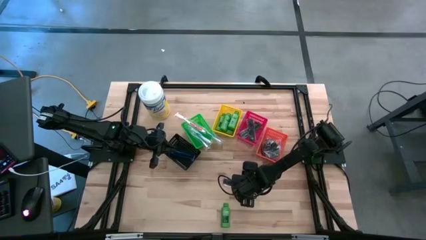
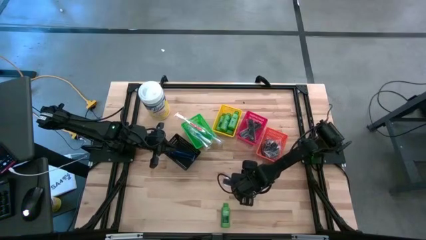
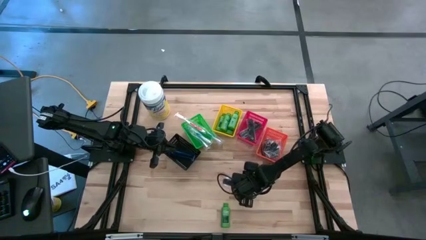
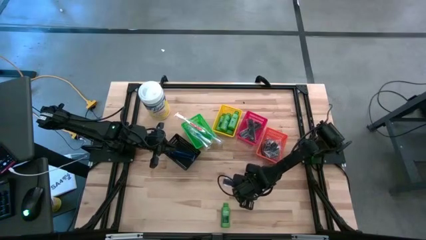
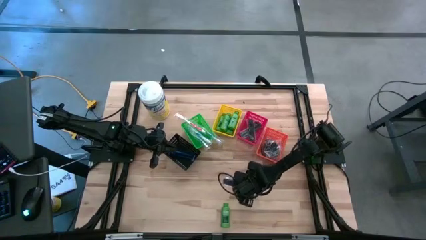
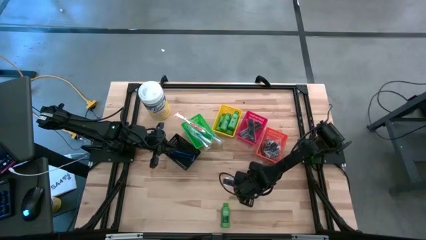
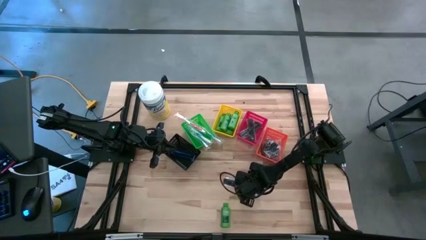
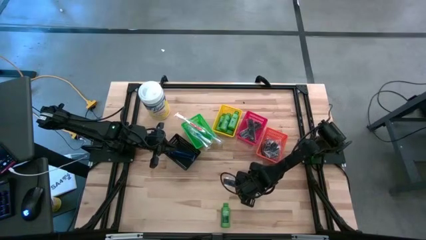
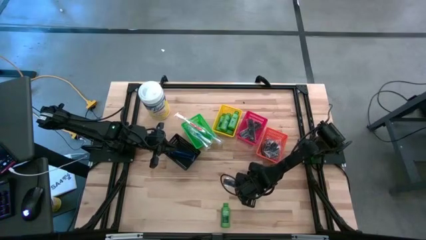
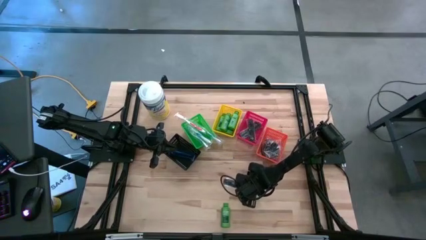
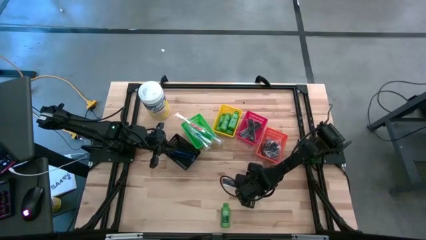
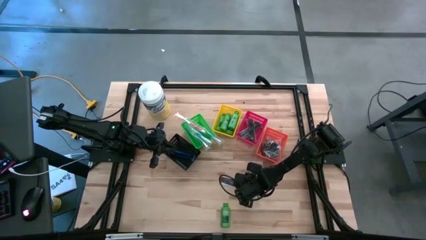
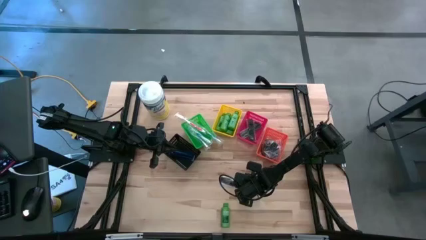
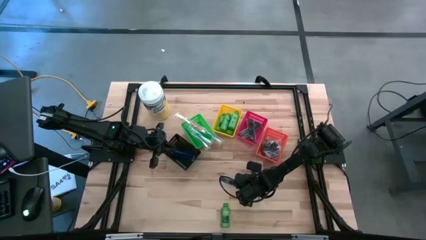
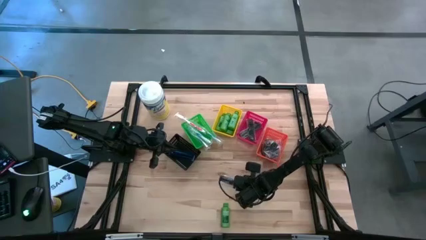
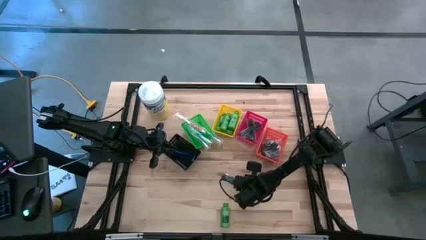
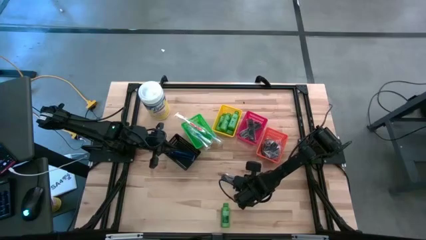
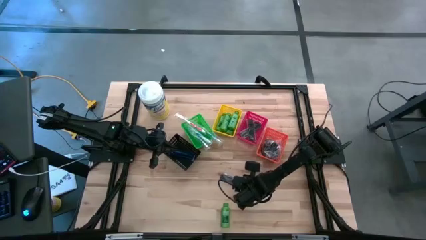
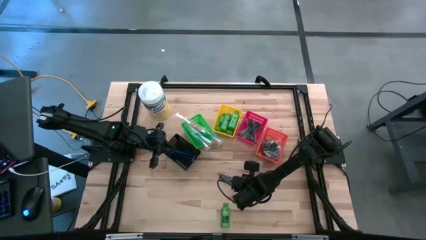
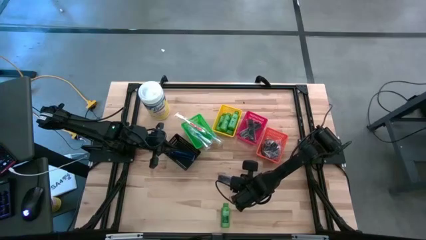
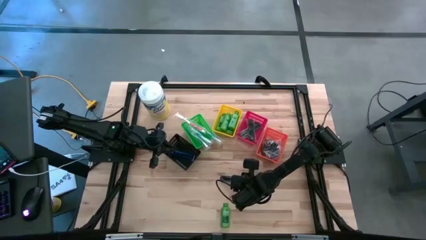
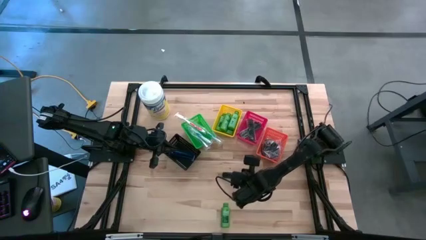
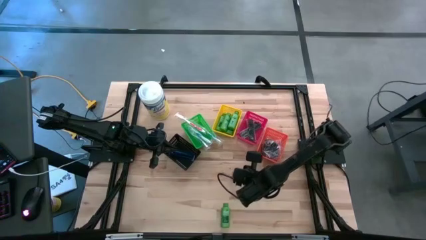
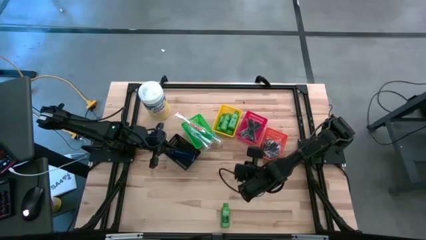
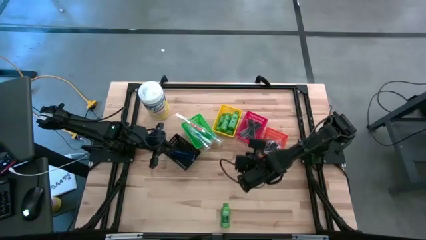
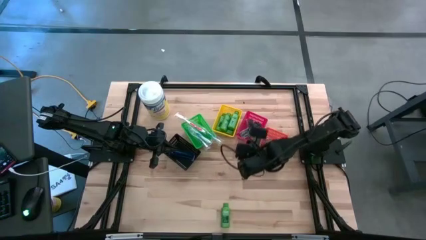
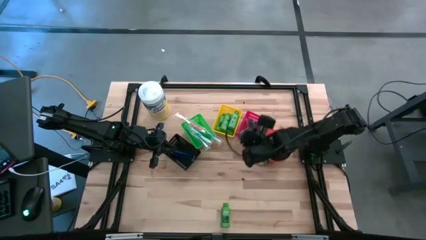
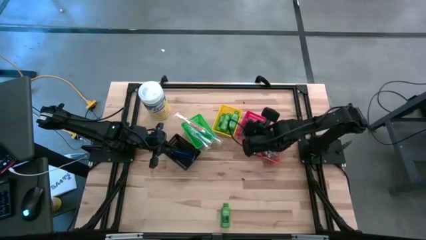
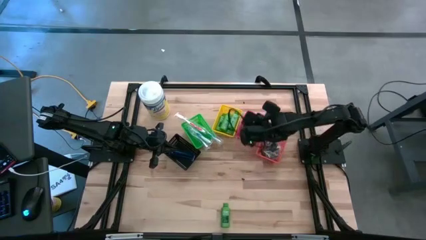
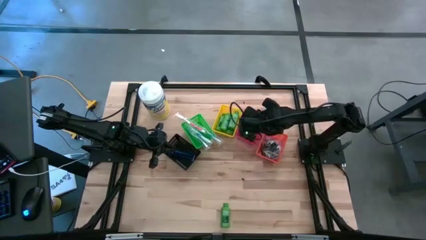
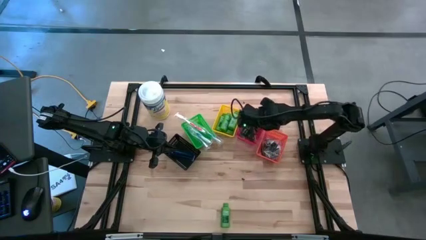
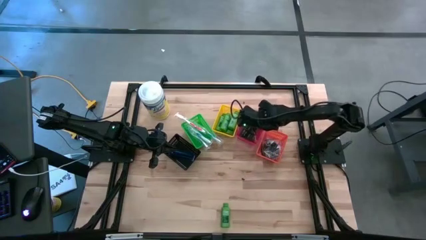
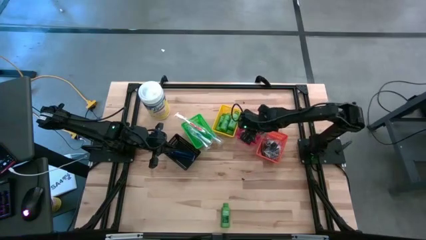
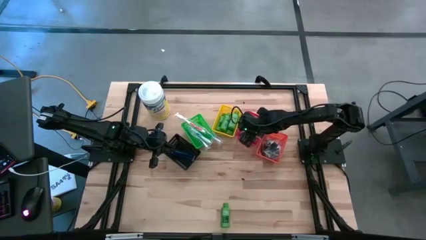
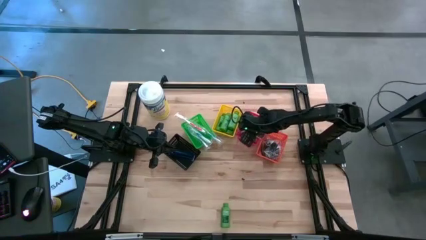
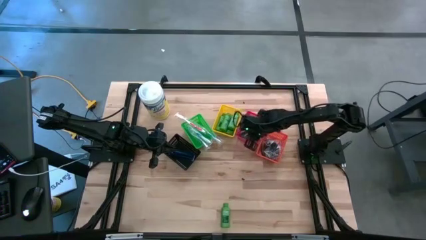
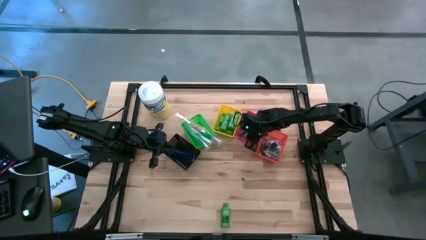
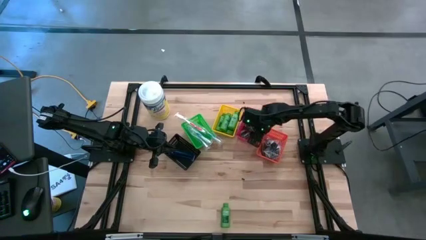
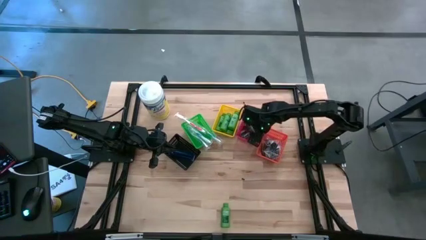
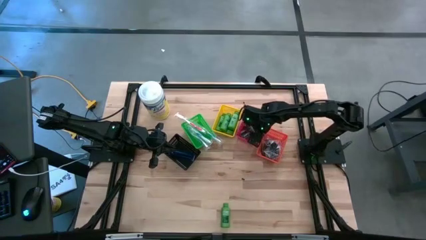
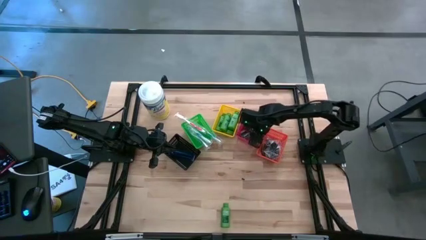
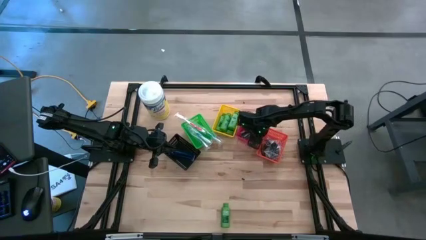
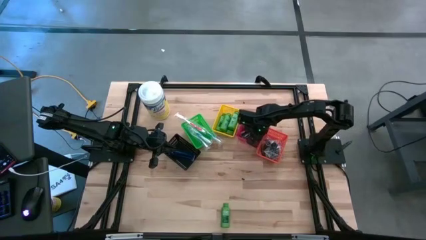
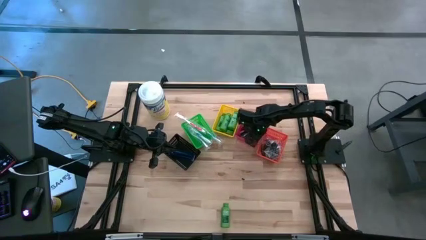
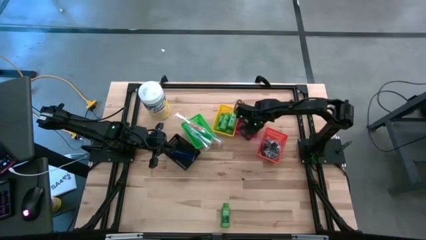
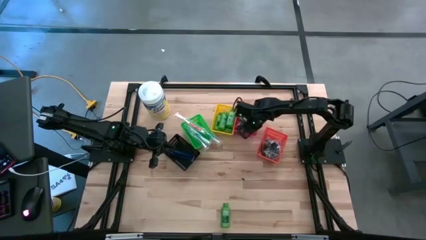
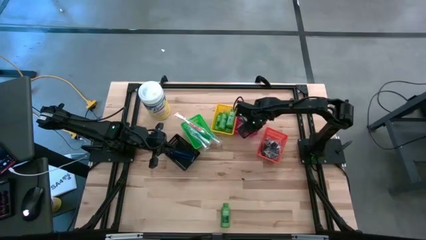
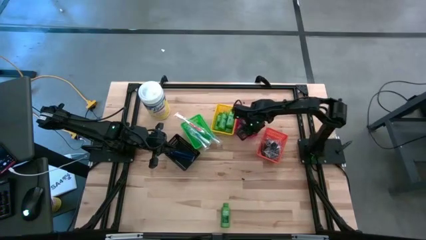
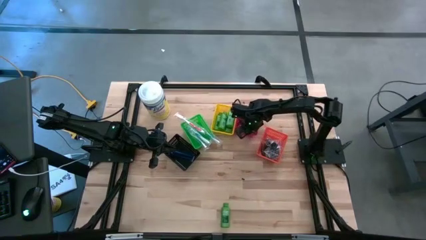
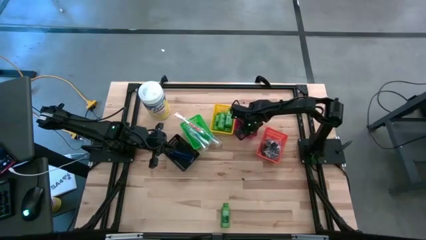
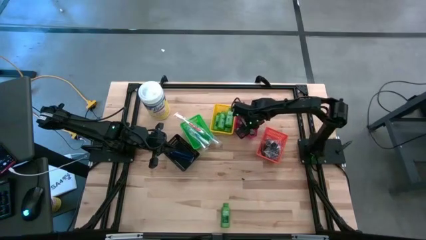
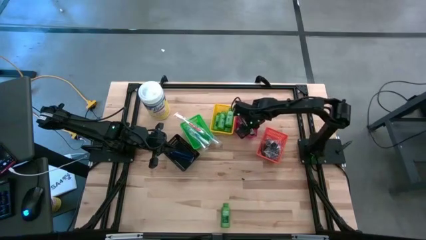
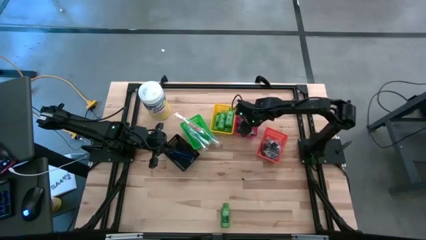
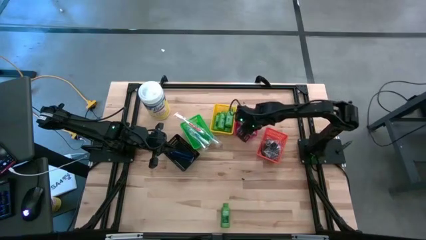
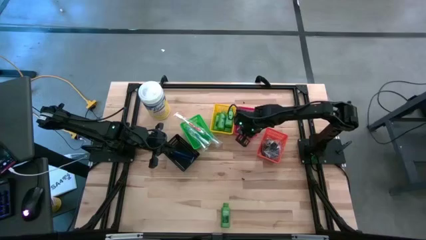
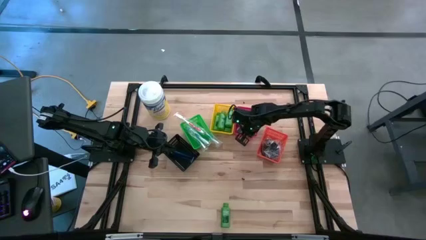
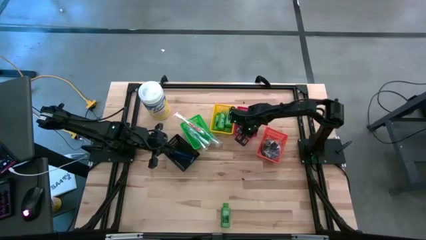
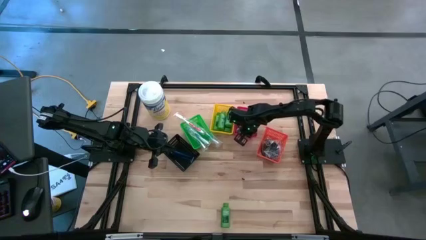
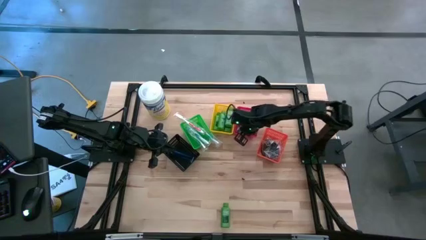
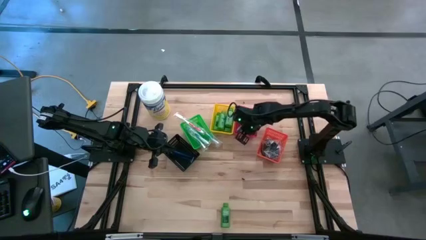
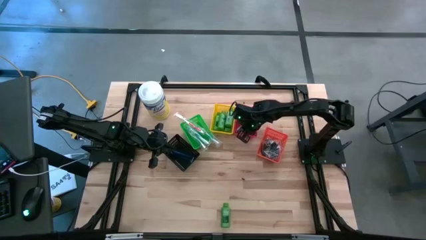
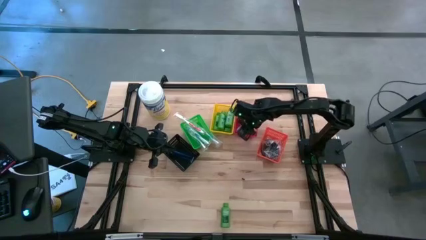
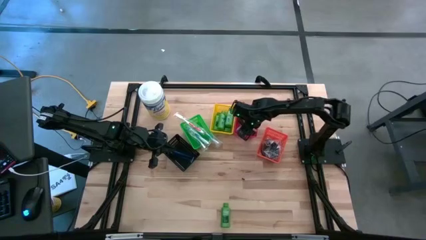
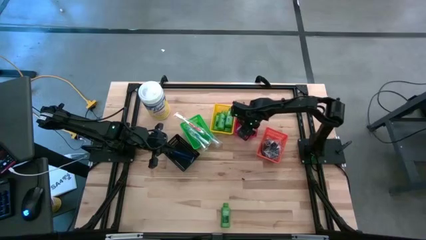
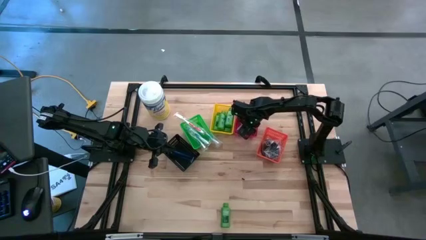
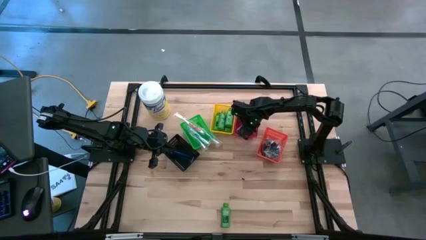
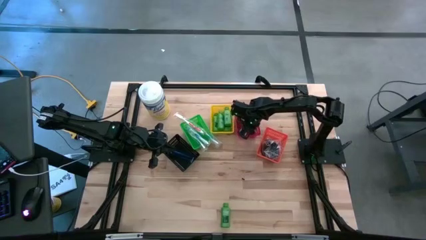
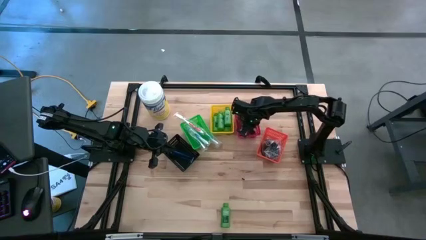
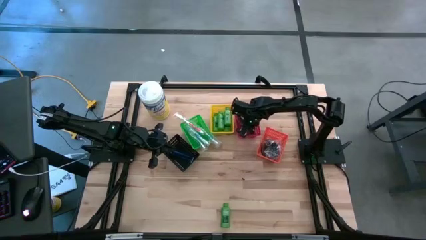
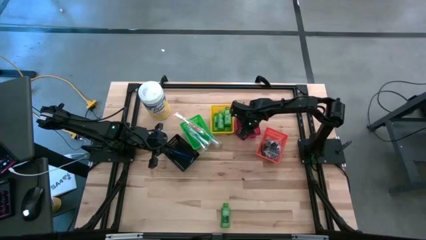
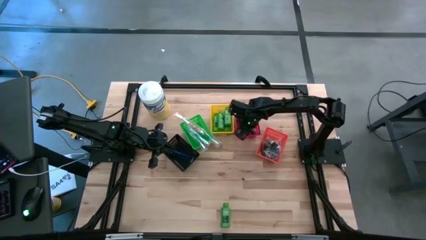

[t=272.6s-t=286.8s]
Task: Pick & Place Travel size toiletries
Put the black comb into the red bin

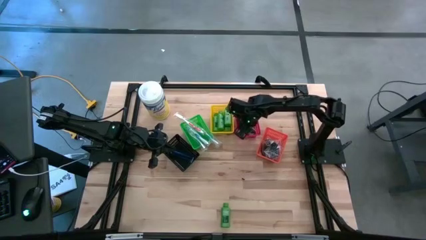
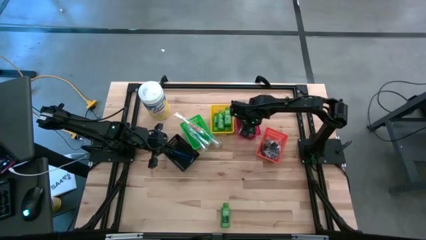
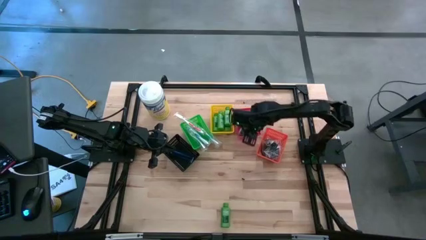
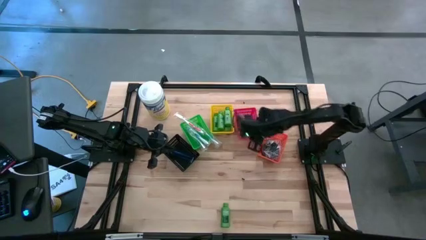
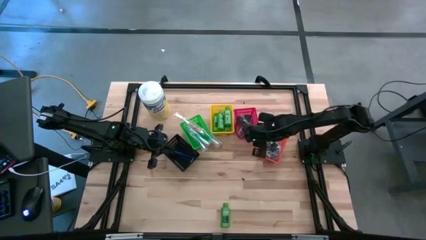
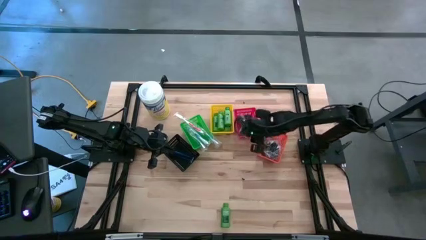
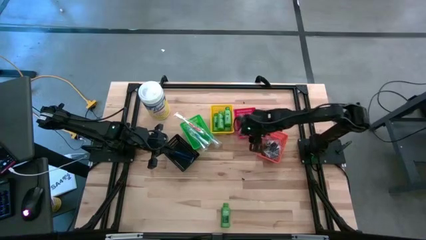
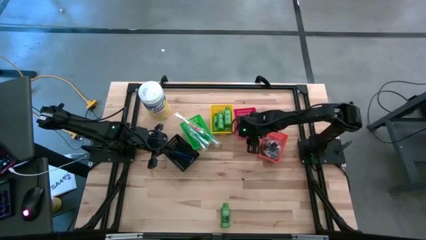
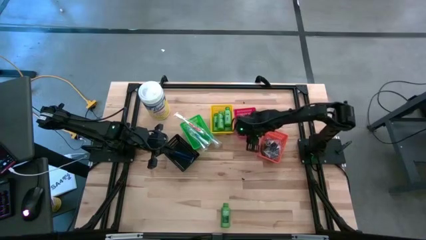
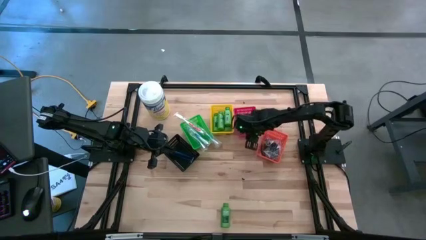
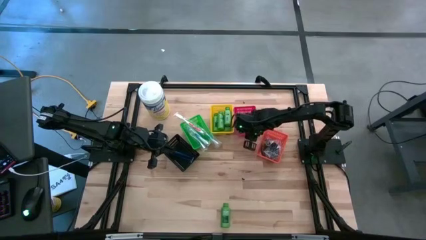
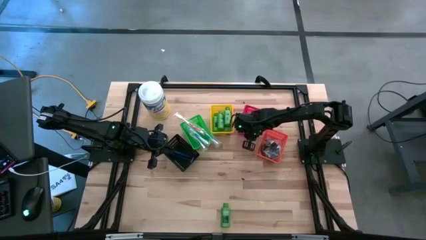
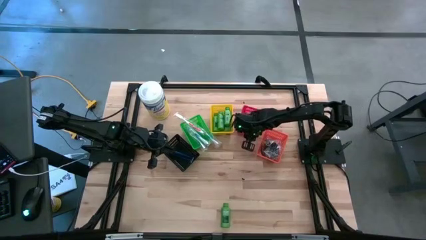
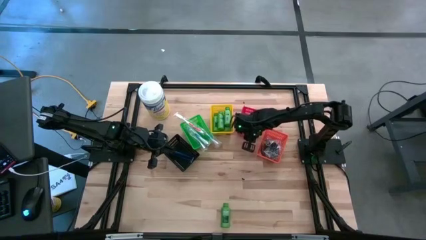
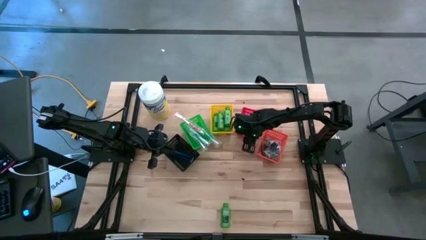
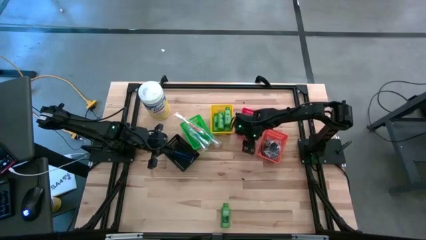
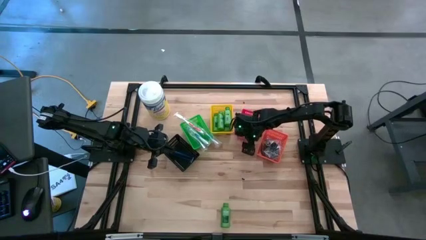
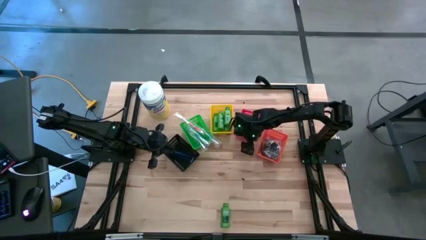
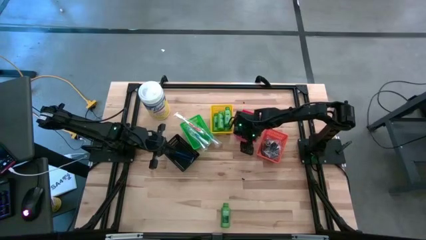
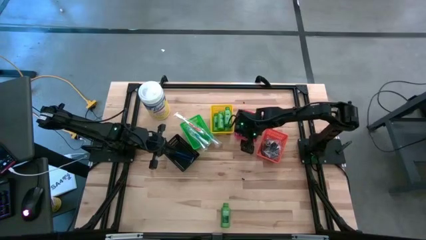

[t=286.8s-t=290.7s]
Adjust the red bin
